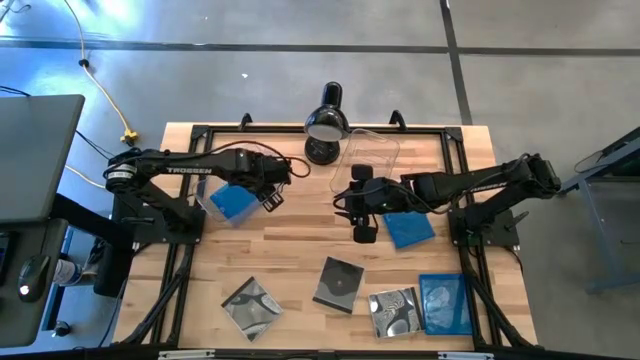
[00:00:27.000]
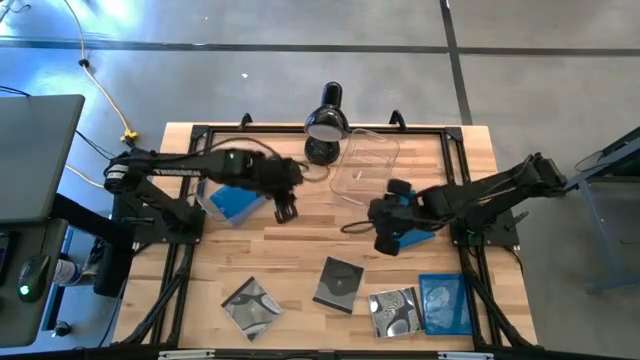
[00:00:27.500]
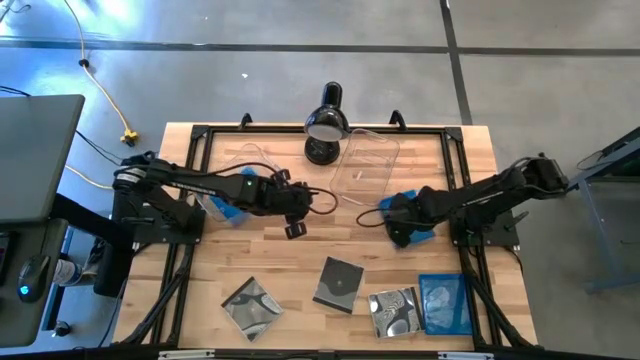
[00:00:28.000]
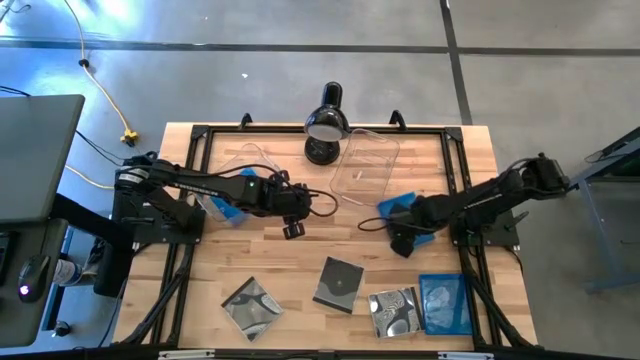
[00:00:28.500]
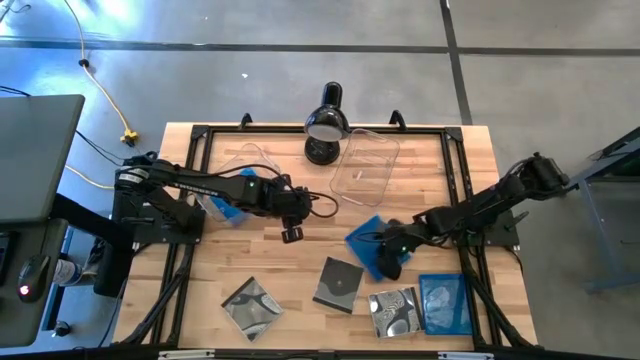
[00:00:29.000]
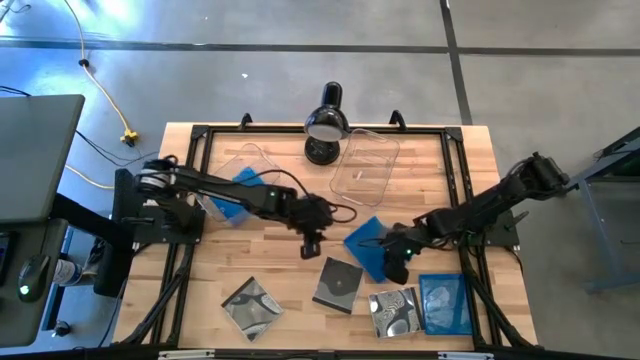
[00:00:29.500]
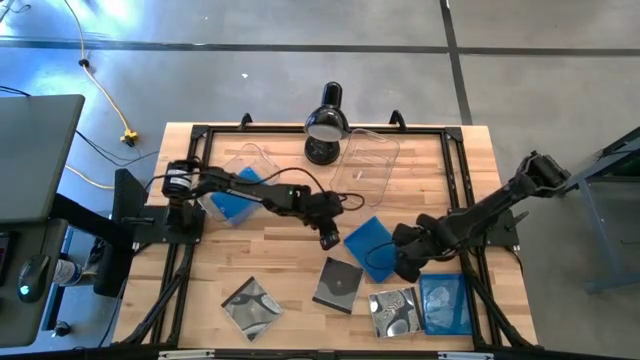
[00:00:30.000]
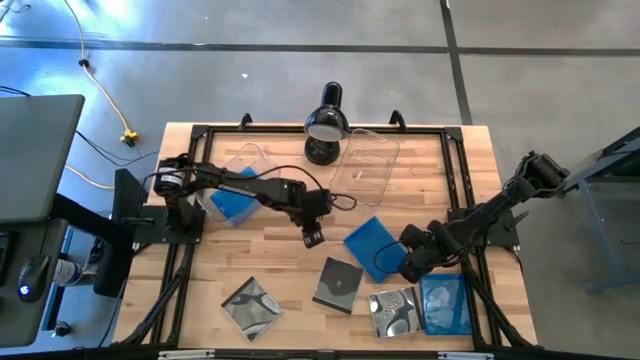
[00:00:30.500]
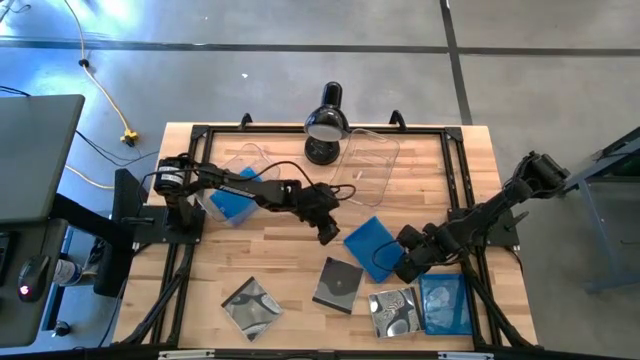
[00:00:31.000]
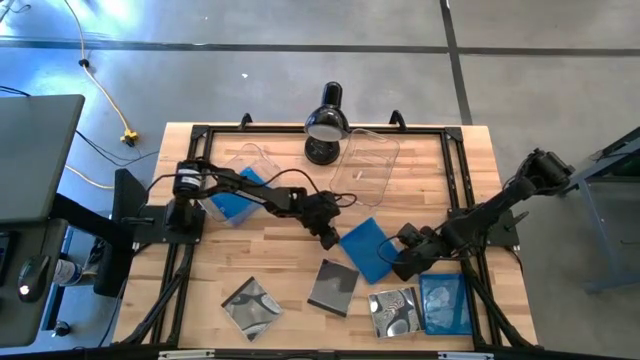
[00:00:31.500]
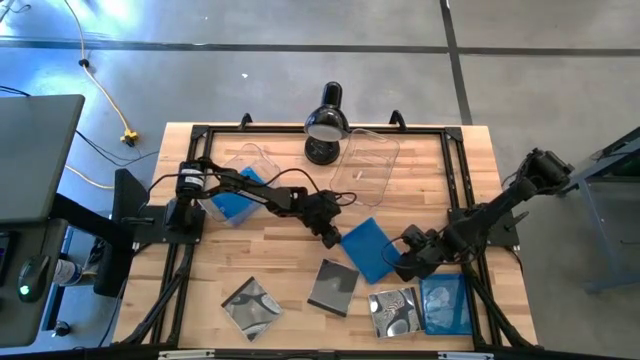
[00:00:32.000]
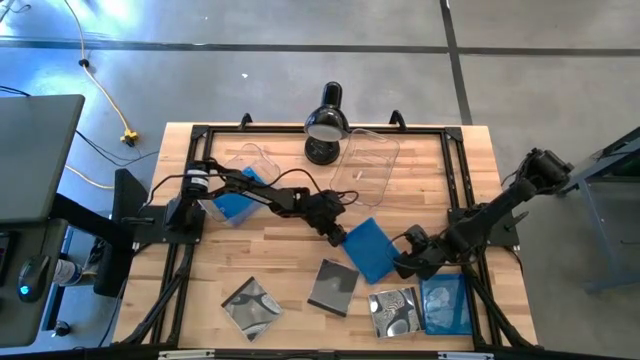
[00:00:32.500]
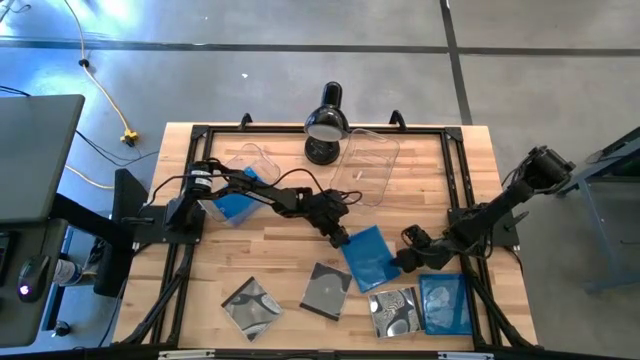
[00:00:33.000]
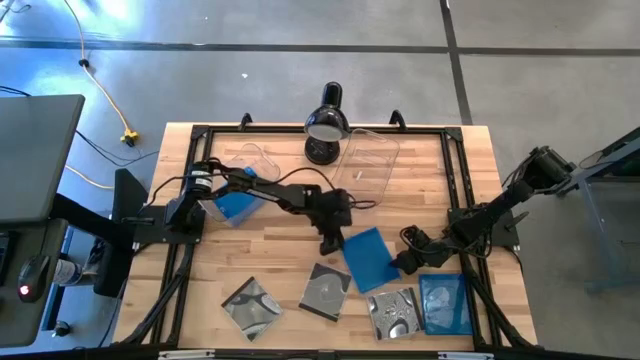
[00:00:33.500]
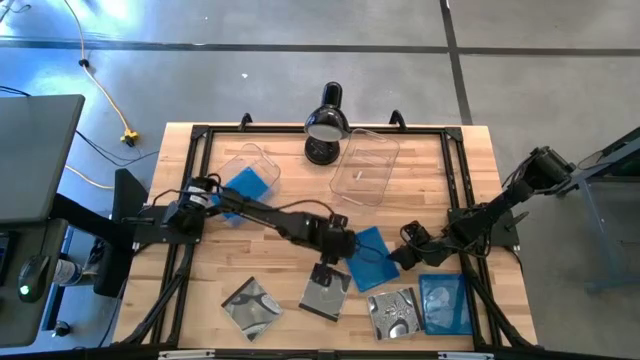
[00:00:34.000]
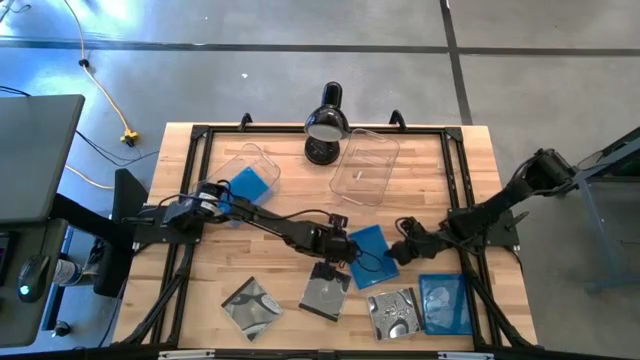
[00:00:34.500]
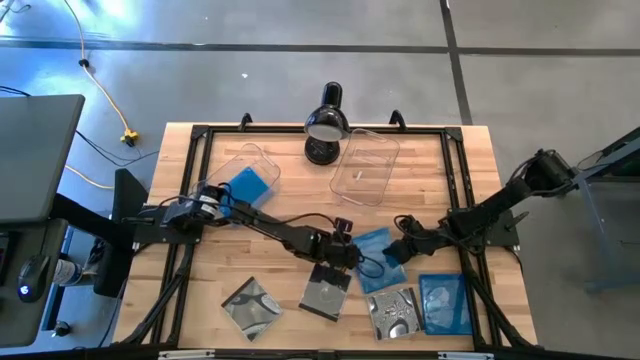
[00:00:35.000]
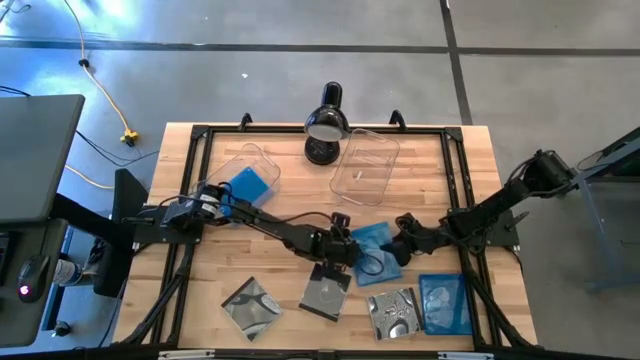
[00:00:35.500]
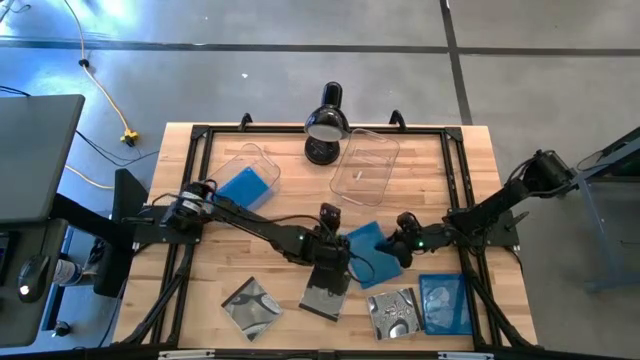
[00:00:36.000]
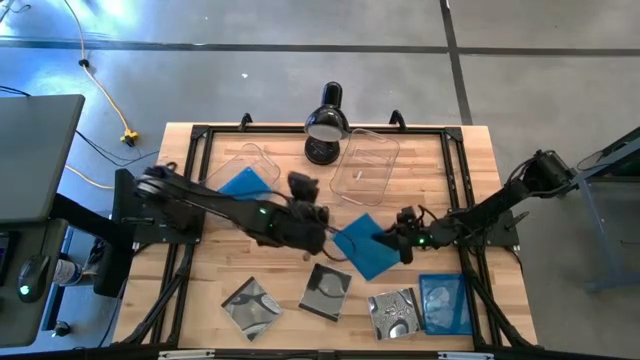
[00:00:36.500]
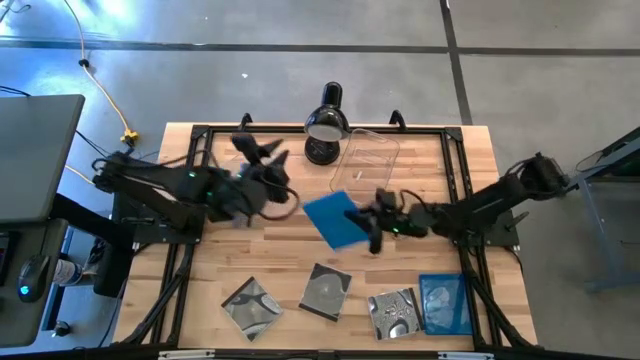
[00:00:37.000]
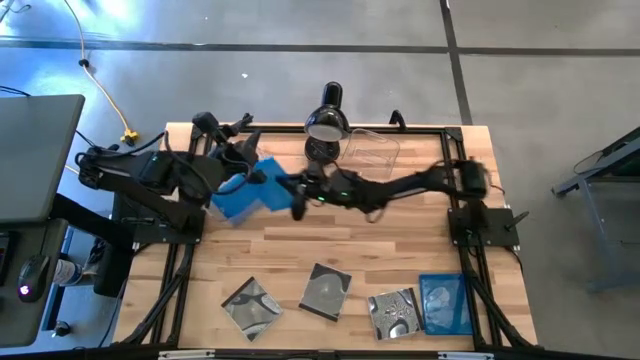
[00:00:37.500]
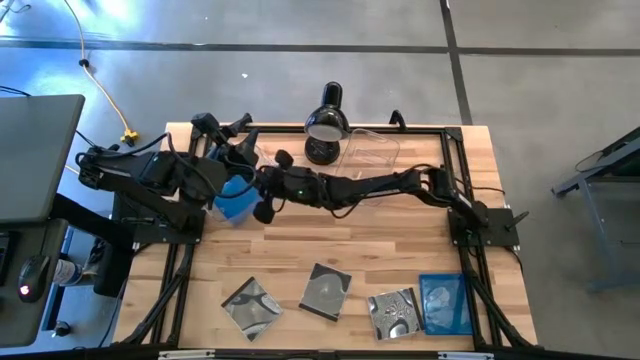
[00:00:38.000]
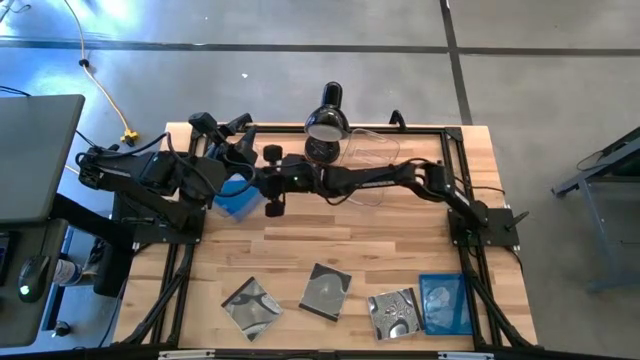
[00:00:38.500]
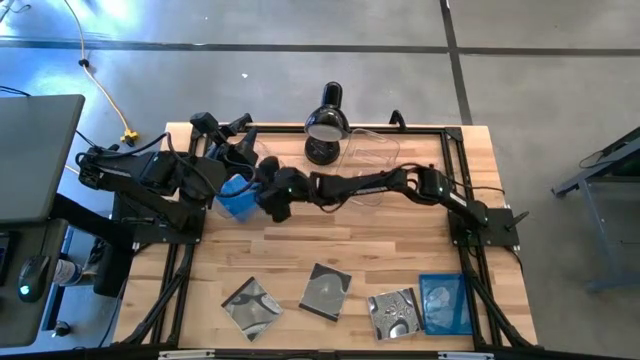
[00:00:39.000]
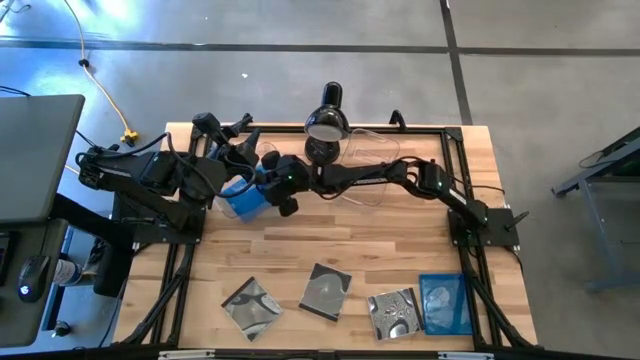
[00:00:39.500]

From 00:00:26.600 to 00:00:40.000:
Task: Pick & place jewel cases by type
Put the top blue CD case into the left transparent bin

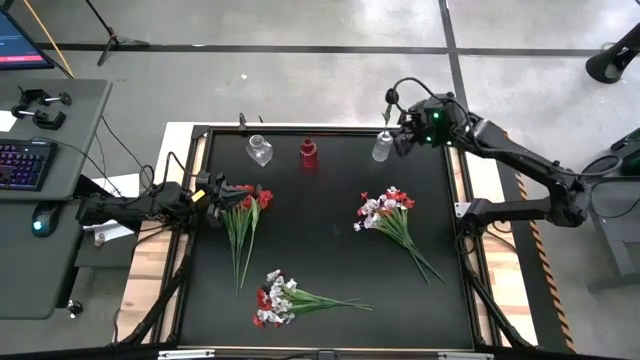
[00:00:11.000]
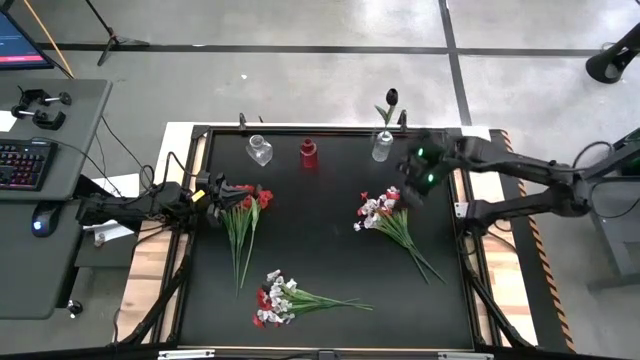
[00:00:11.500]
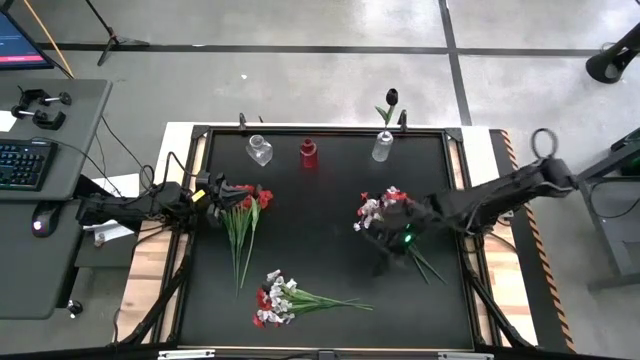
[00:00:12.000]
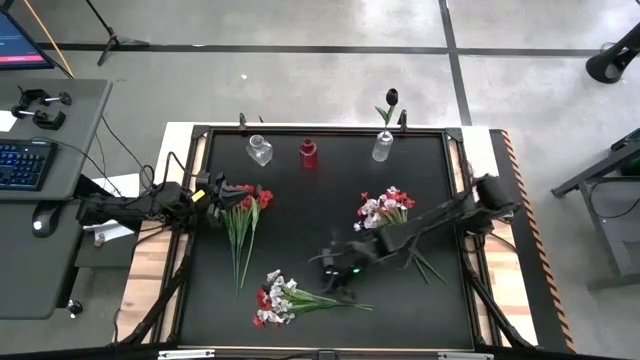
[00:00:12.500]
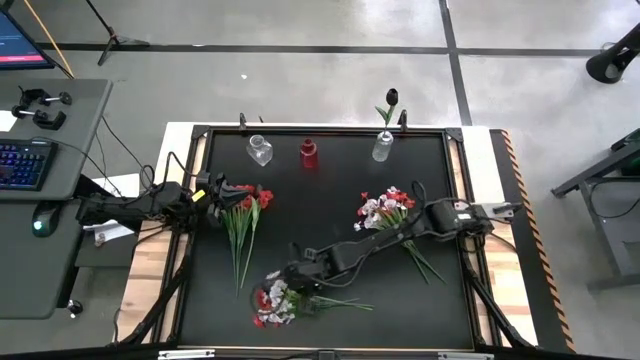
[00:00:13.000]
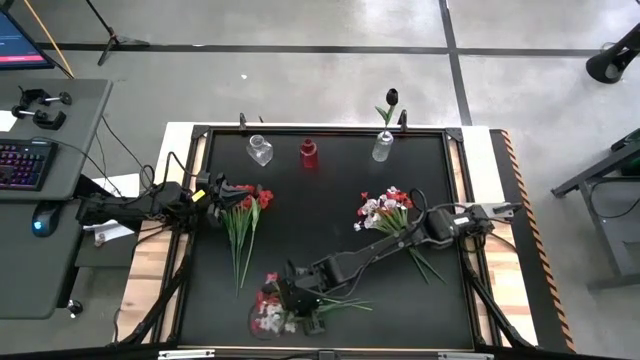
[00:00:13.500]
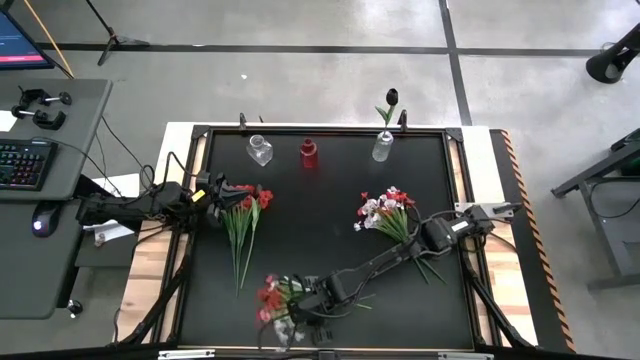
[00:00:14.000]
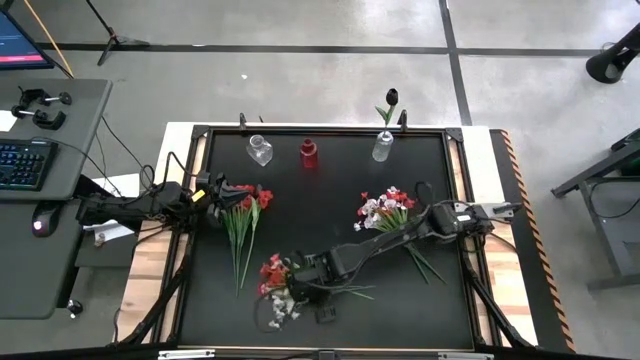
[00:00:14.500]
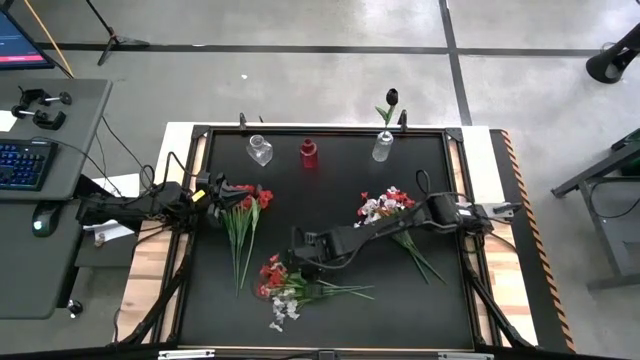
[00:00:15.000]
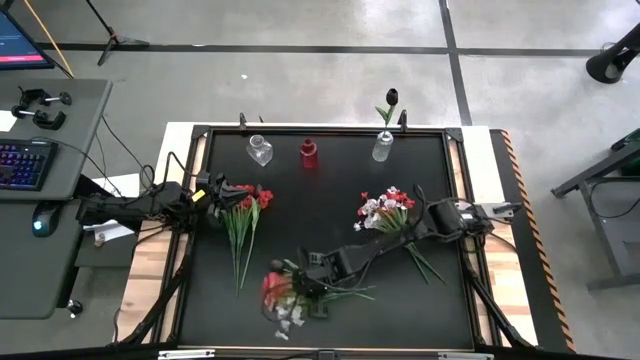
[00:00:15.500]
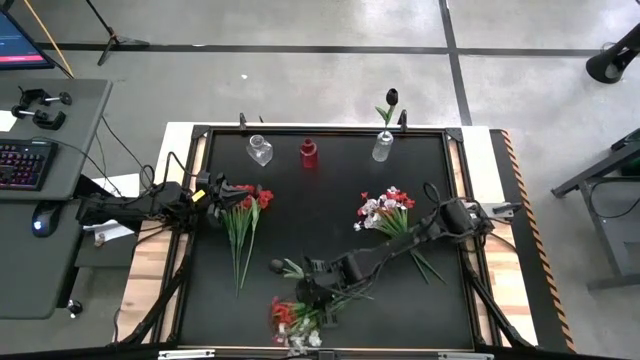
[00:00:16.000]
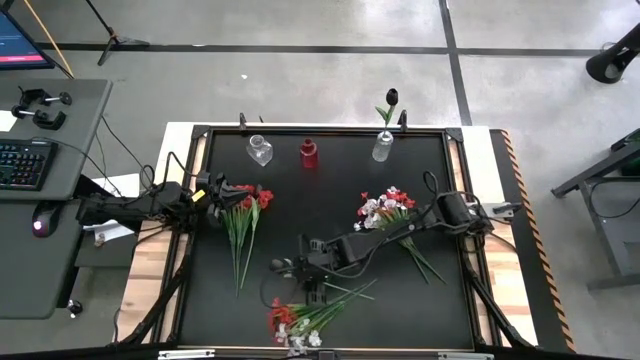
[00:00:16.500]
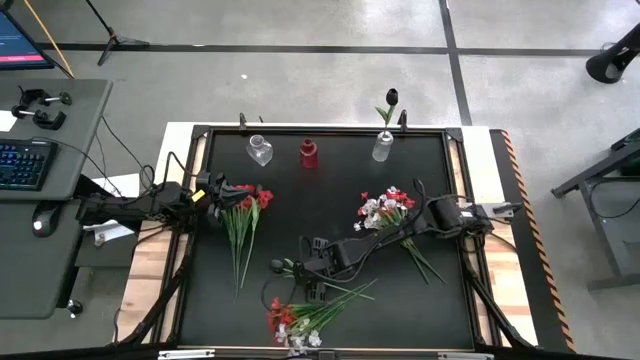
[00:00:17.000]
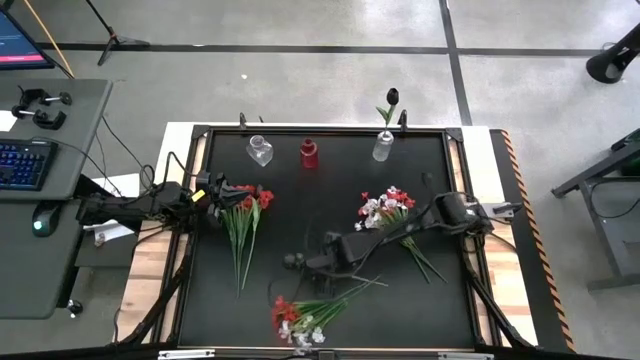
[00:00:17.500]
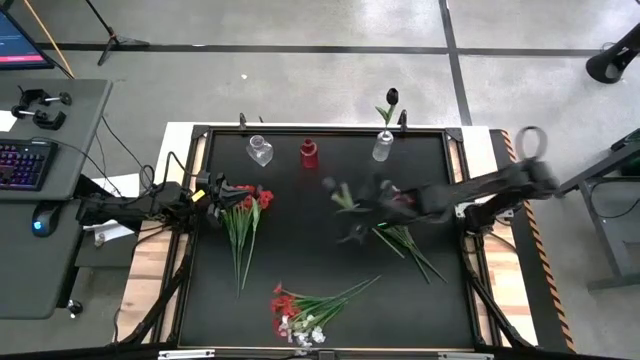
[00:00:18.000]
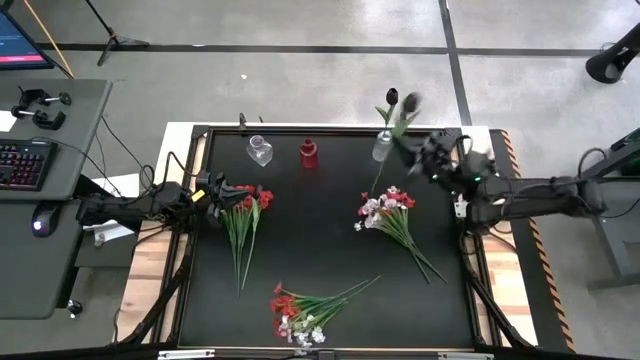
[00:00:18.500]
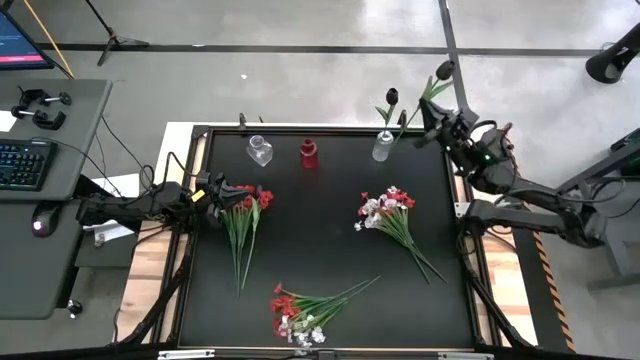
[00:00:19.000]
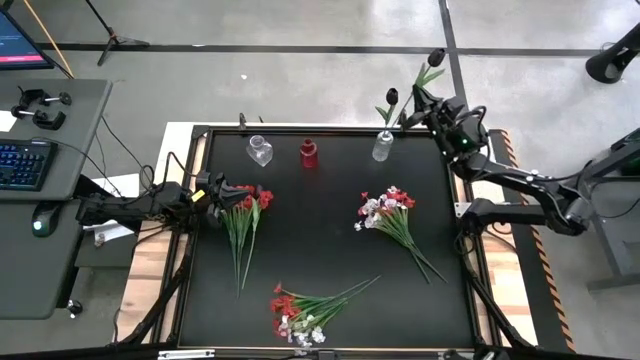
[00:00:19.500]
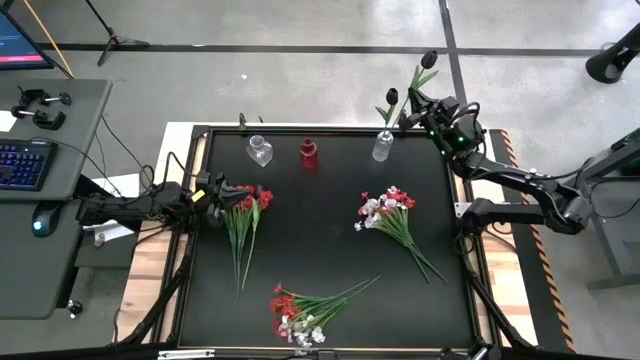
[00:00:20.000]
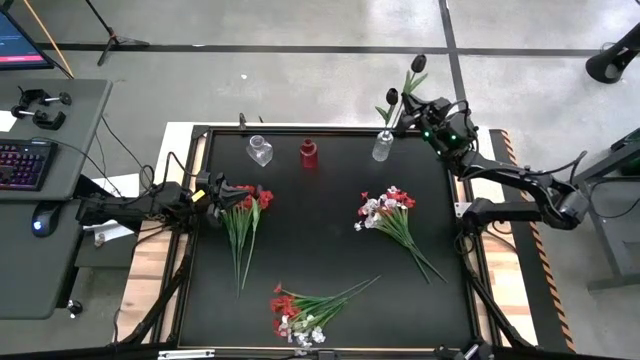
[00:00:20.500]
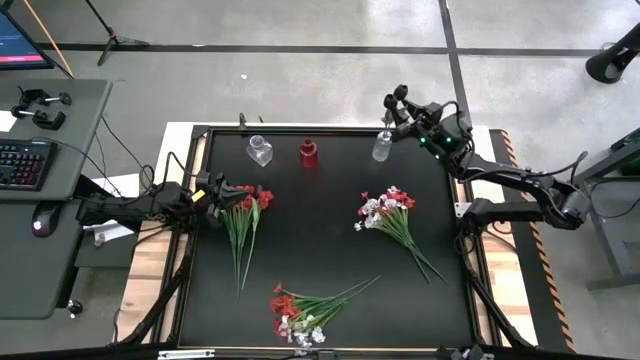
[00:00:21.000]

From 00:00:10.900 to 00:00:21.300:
Task: Sort flowers into vase by color
Put the bottom black flower into the right transparent flower vase
